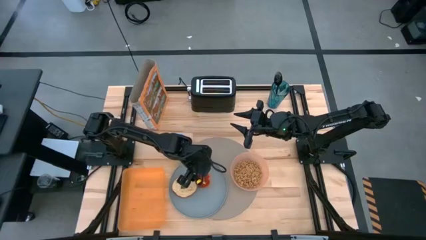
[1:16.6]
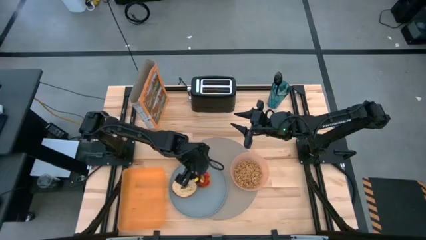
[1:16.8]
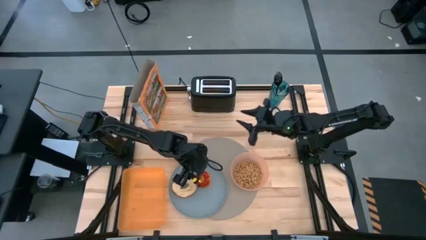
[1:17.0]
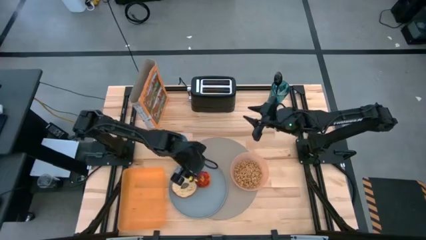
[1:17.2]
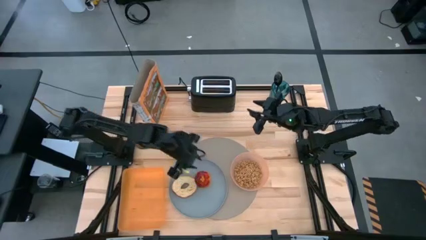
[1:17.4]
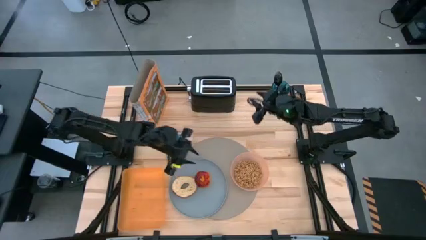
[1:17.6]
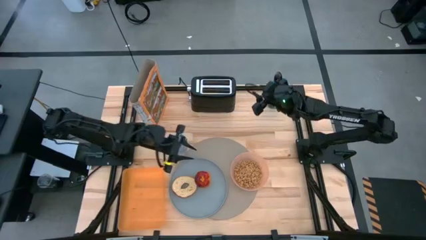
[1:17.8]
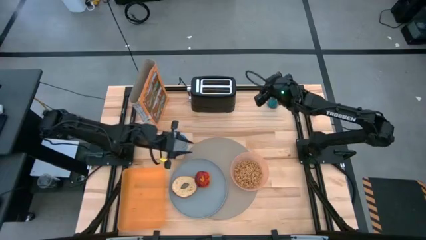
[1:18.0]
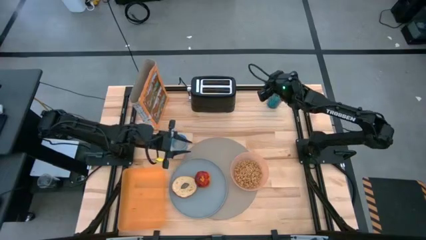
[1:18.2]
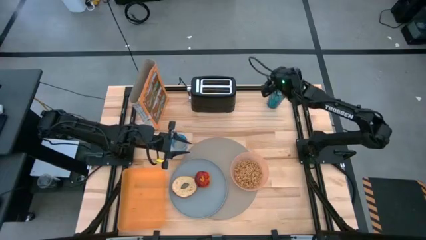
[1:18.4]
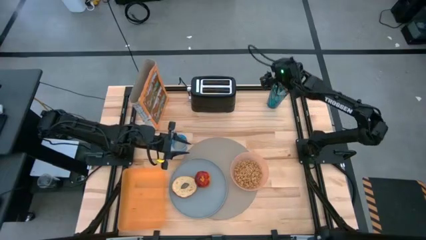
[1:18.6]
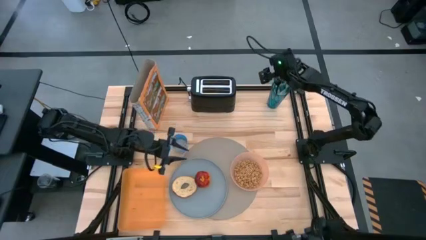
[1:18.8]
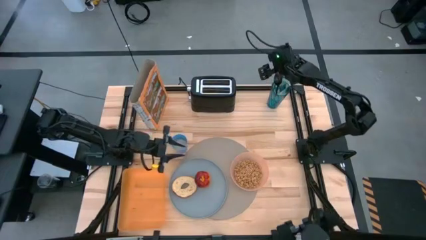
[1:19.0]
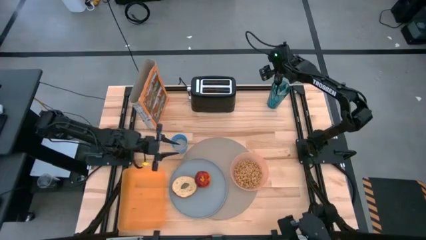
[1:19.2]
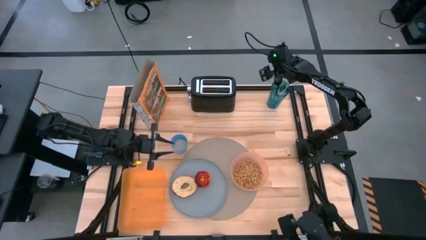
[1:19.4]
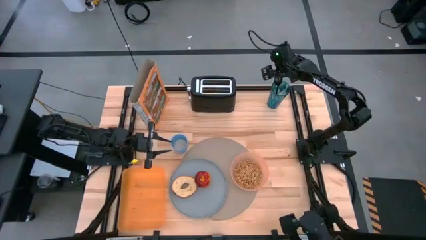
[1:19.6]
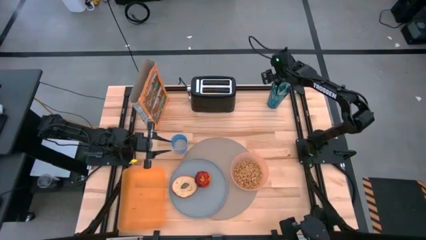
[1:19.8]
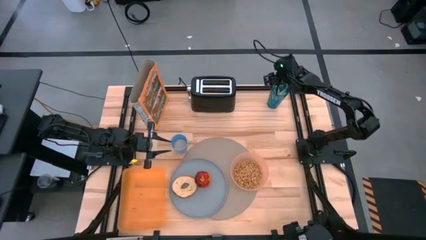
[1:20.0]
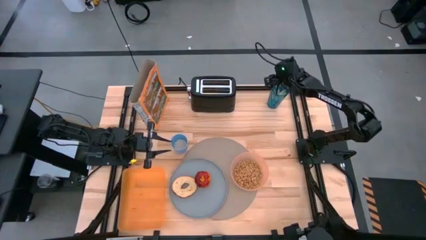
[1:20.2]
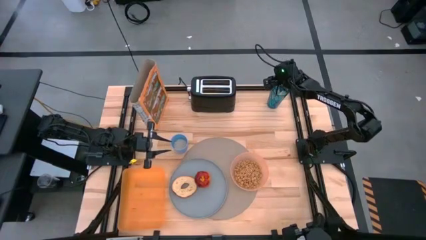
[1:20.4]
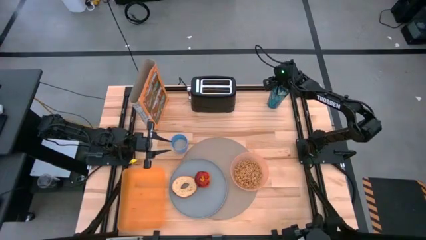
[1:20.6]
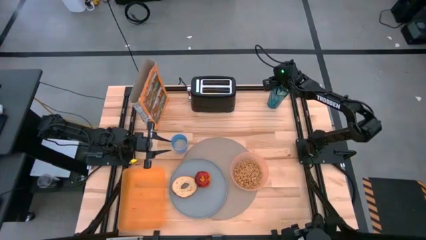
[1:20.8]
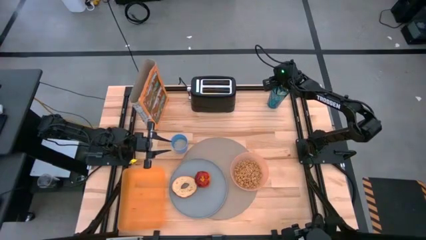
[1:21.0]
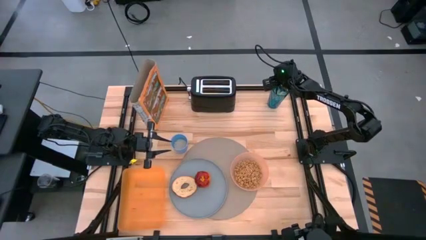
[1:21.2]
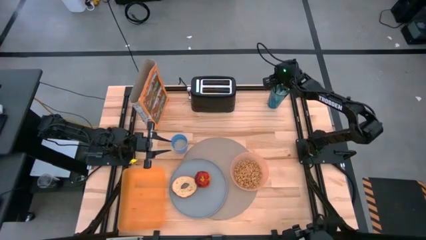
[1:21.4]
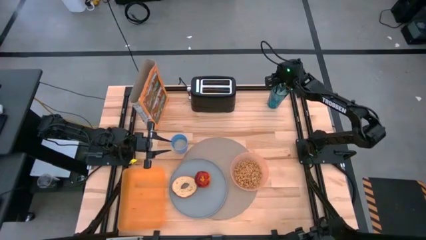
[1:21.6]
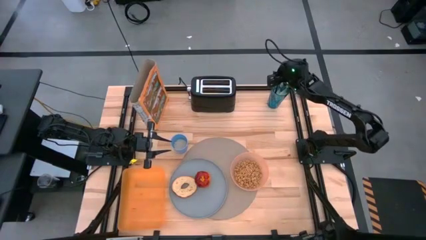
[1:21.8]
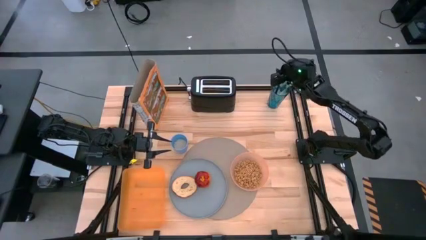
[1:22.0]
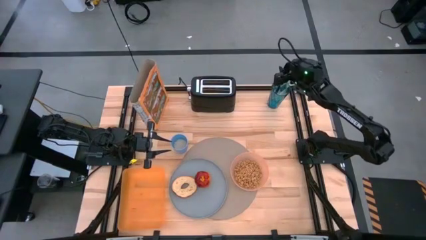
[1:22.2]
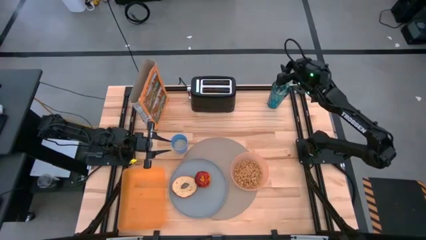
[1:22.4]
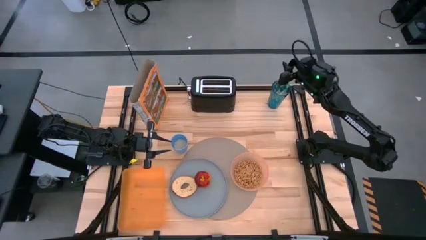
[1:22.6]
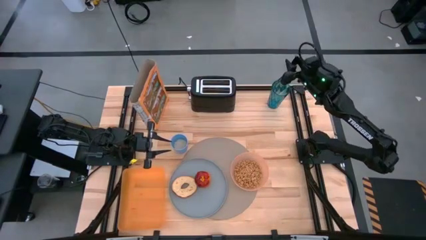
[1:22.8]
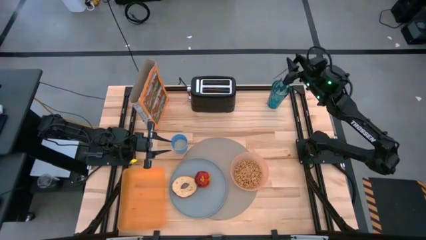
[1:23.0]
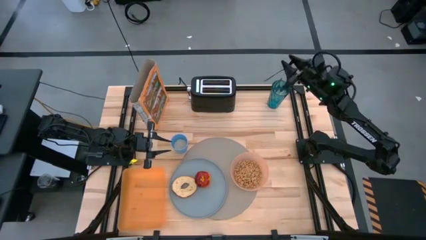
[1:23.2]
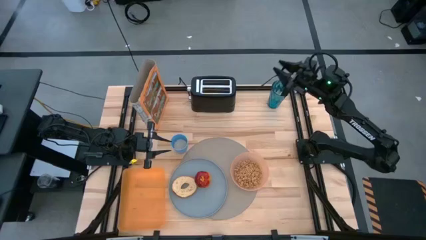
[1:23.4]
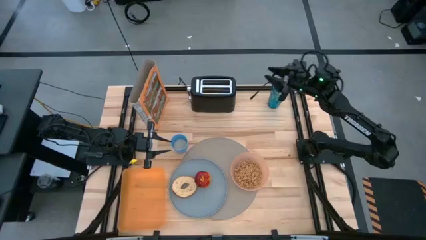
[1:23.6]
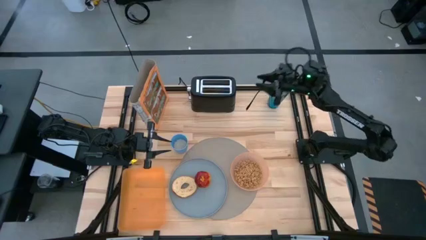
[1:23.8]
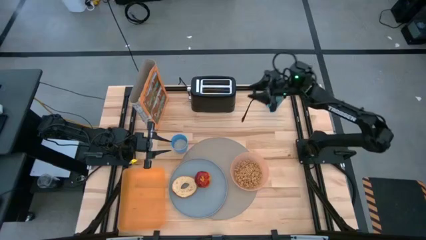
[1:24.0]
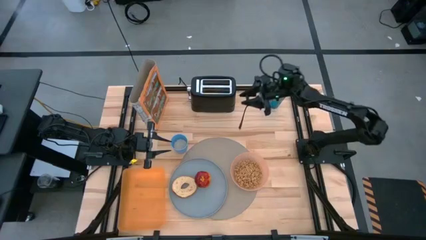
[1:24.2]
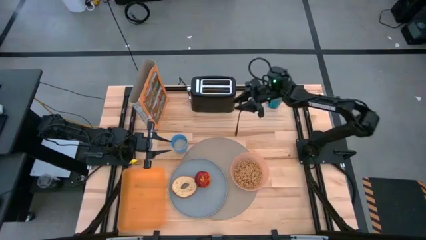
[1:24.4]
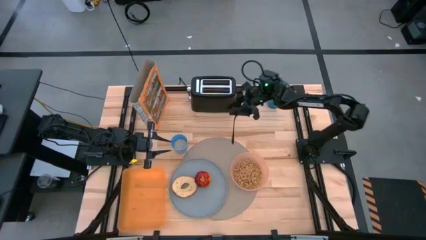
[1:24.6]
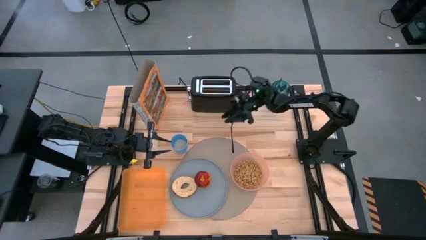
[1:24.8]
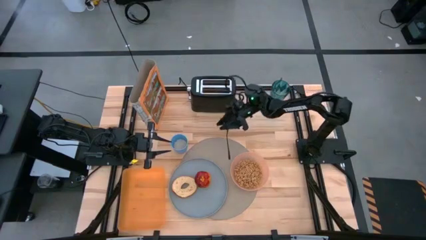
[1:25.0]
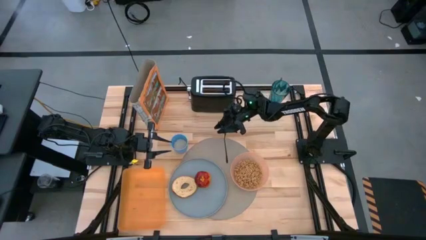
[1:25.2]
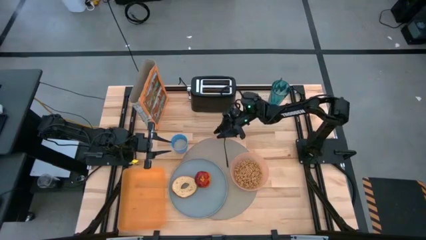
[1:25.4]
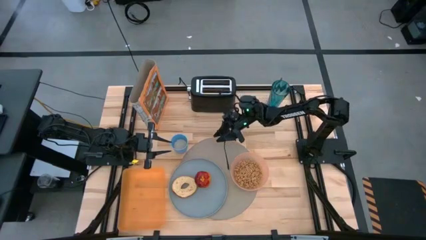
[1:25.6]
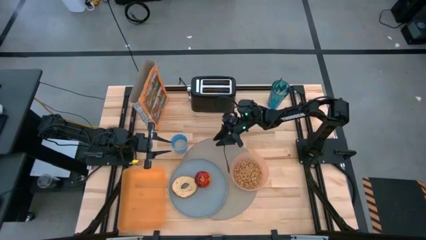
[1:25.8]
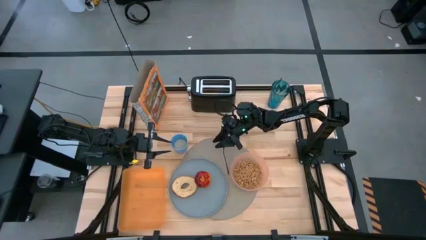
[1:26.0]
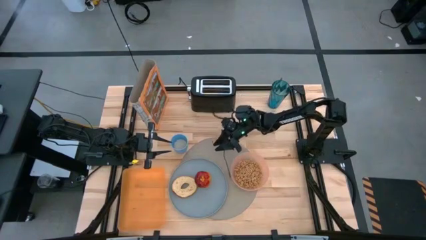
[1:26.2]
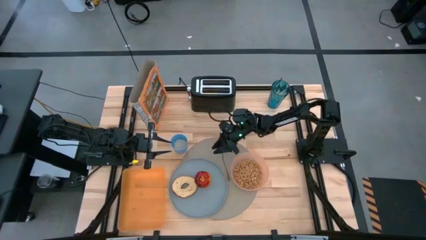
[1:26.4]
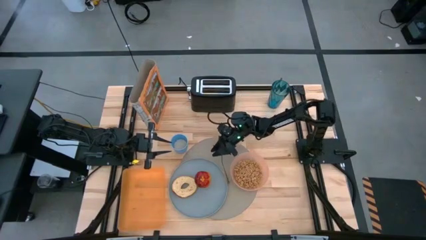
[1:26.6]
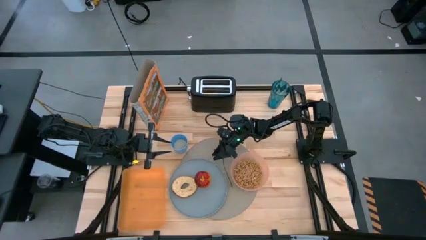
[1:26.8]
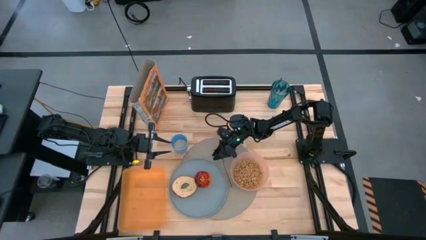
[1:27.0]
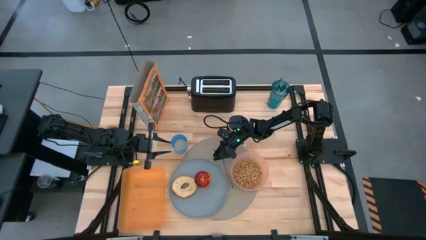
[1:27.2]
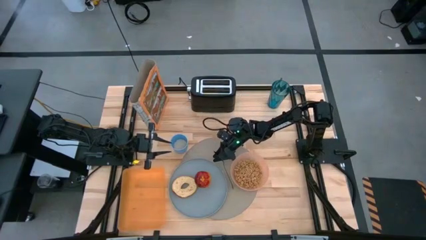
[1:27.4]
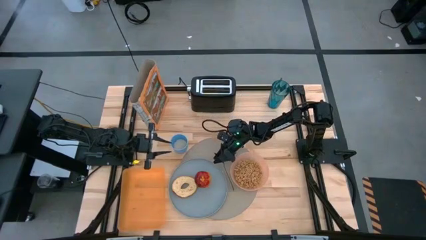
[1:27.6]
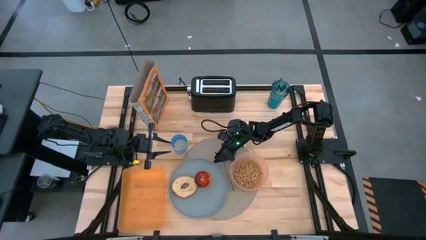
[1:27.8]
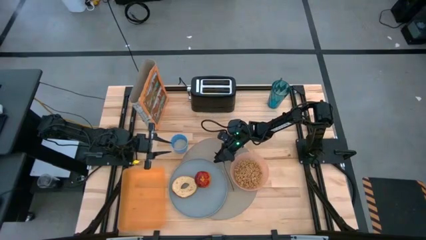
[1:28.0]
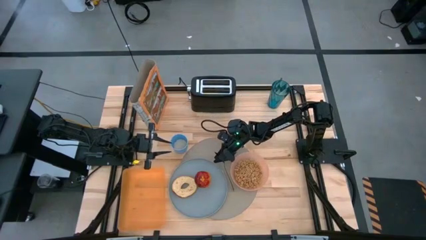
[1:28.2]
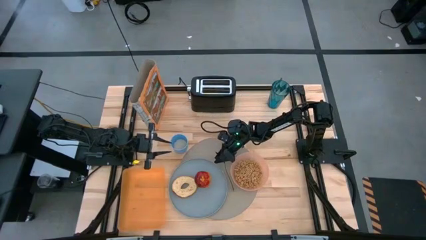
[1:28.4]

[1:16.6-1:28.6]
Task: Arrange a breakfast setting
Put the silver spoon on the tablemat between the blue plate and the light orange bowl
